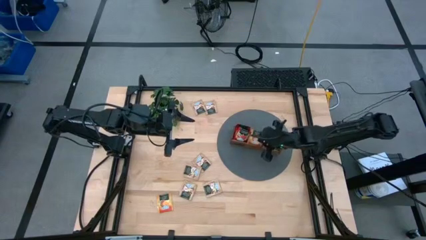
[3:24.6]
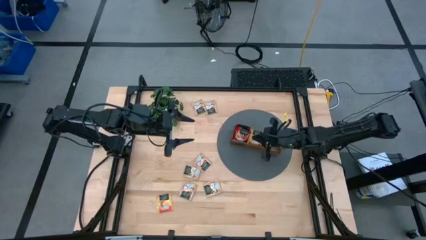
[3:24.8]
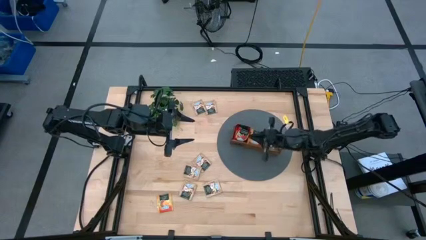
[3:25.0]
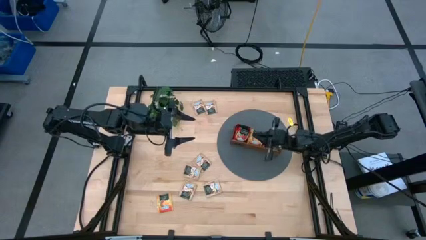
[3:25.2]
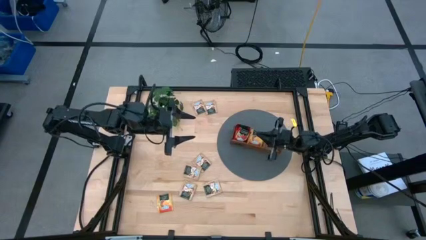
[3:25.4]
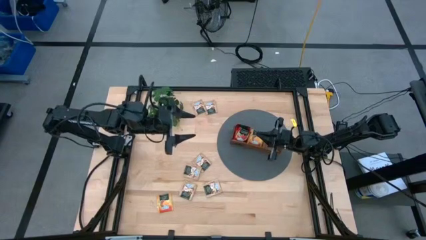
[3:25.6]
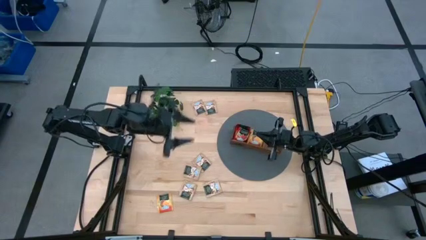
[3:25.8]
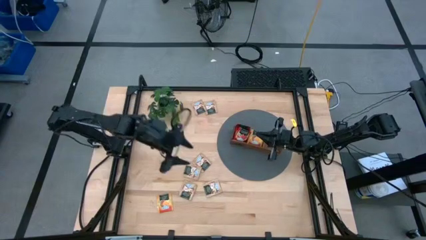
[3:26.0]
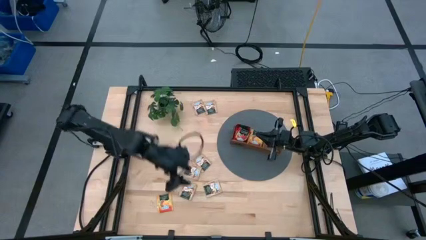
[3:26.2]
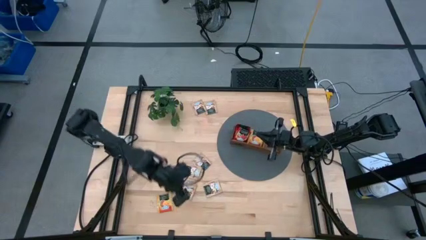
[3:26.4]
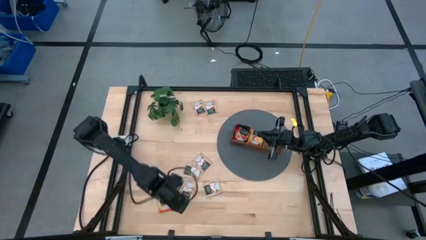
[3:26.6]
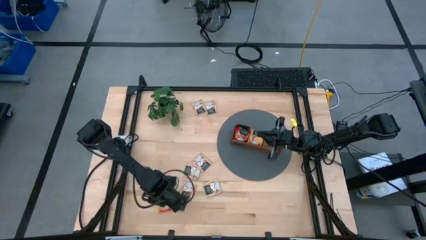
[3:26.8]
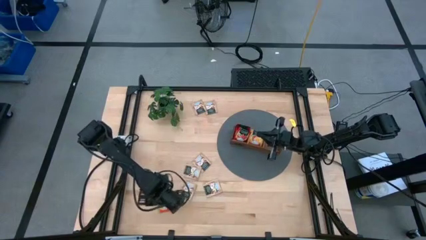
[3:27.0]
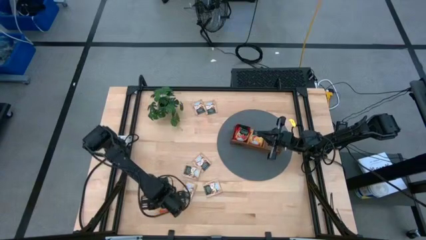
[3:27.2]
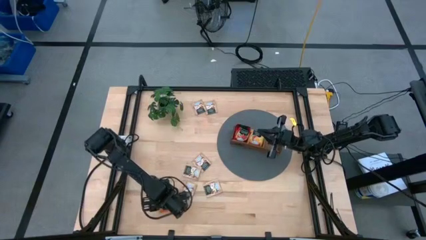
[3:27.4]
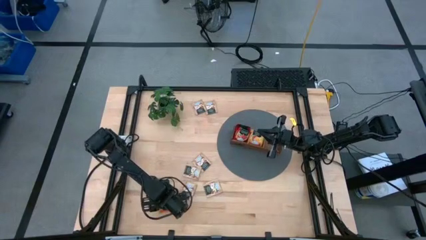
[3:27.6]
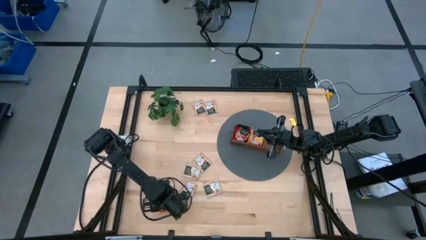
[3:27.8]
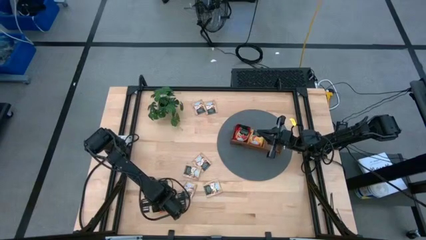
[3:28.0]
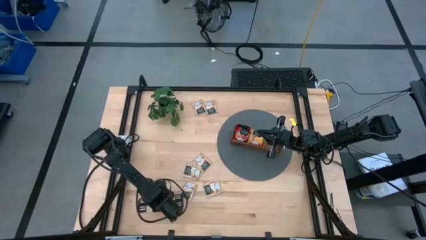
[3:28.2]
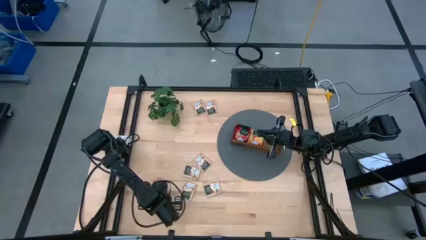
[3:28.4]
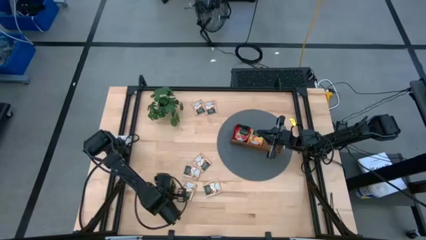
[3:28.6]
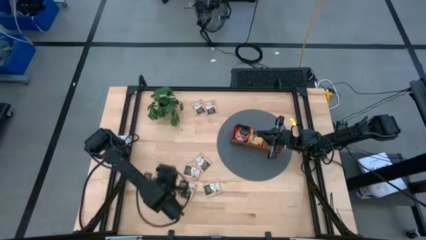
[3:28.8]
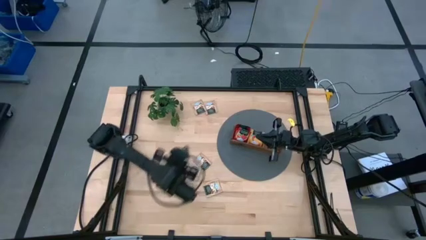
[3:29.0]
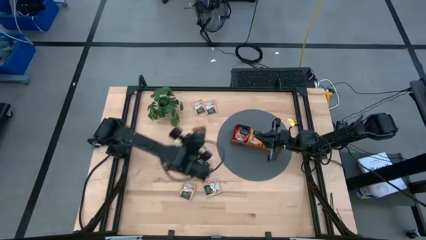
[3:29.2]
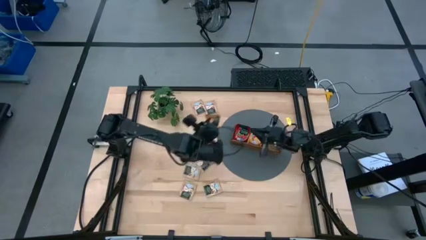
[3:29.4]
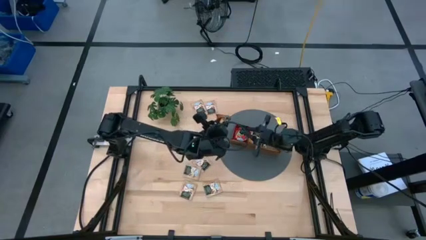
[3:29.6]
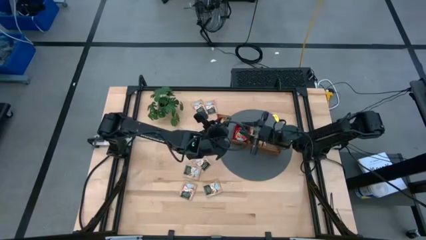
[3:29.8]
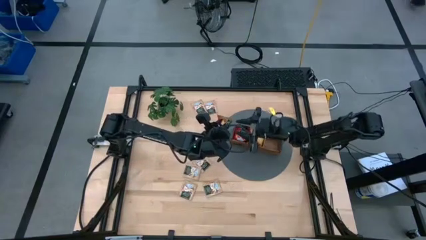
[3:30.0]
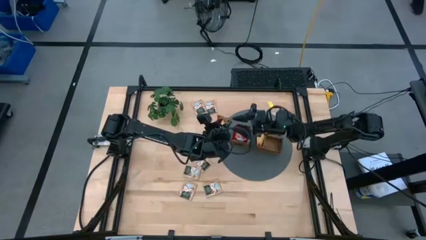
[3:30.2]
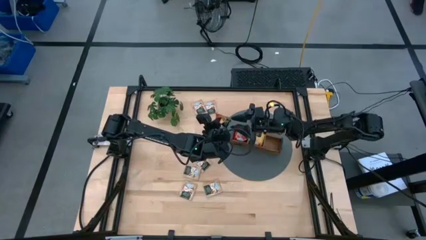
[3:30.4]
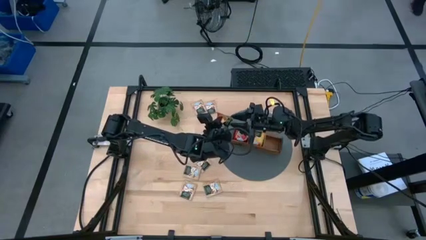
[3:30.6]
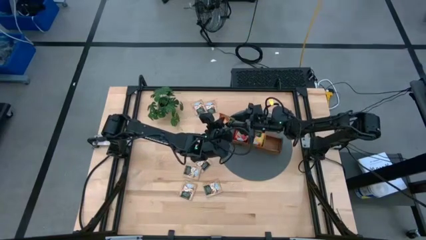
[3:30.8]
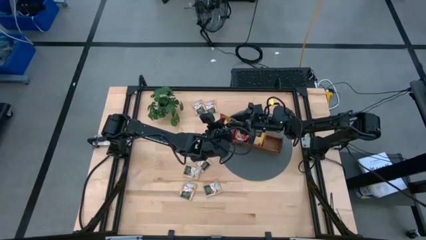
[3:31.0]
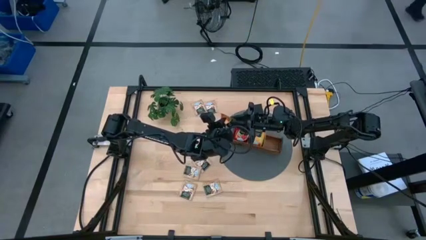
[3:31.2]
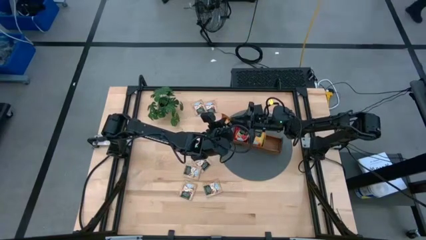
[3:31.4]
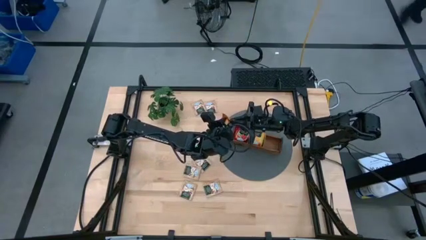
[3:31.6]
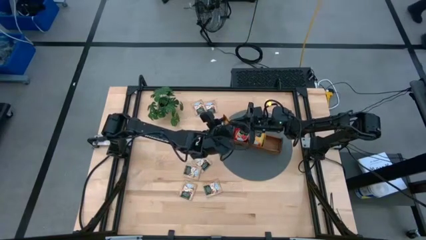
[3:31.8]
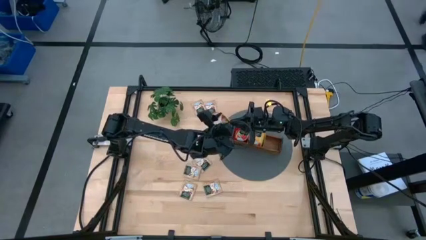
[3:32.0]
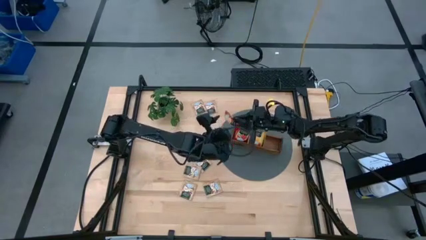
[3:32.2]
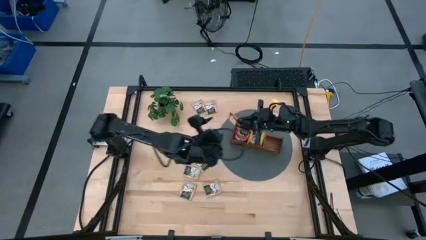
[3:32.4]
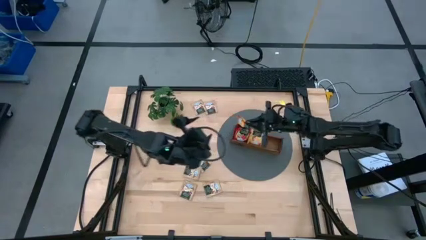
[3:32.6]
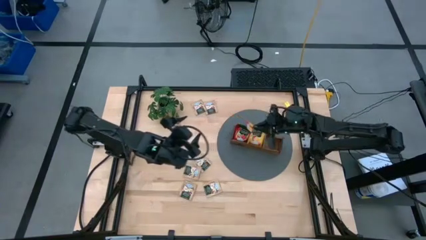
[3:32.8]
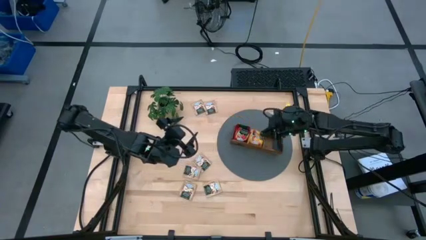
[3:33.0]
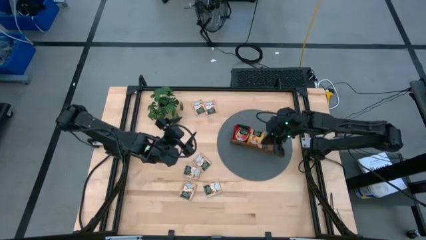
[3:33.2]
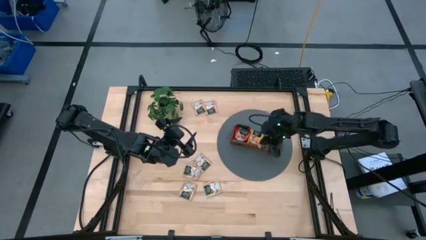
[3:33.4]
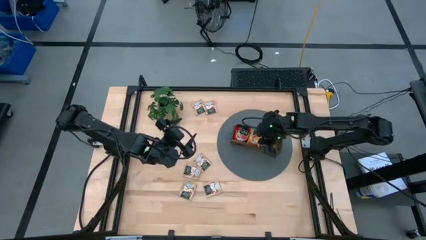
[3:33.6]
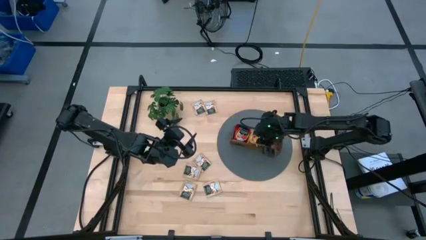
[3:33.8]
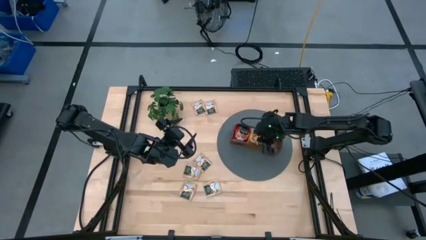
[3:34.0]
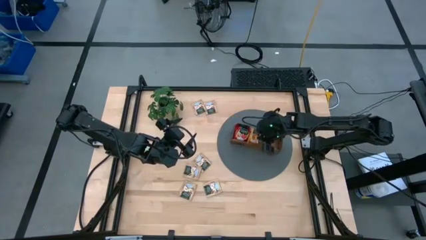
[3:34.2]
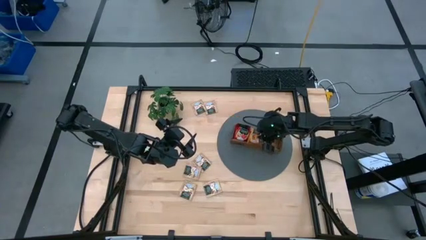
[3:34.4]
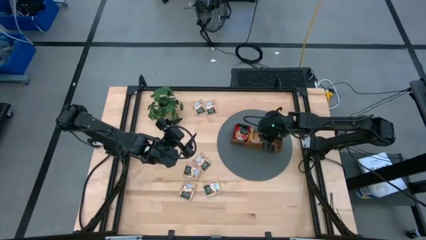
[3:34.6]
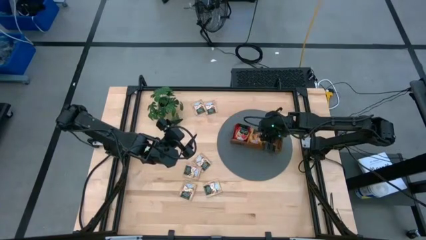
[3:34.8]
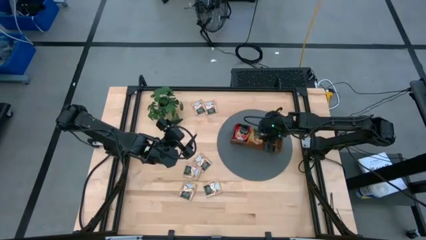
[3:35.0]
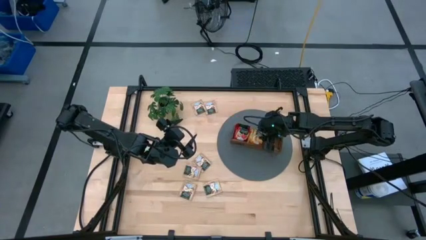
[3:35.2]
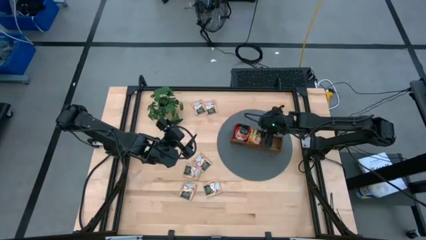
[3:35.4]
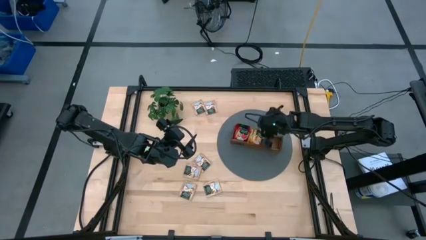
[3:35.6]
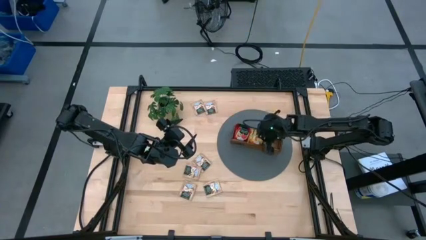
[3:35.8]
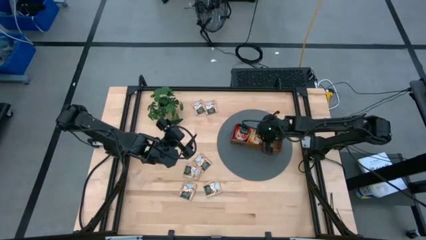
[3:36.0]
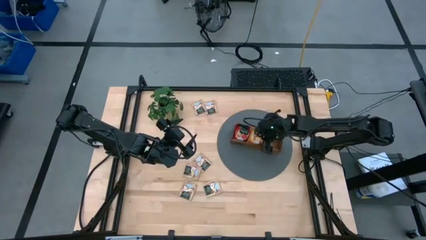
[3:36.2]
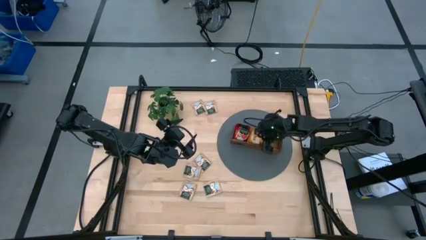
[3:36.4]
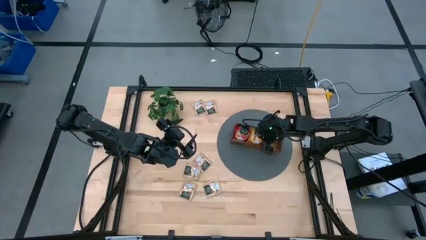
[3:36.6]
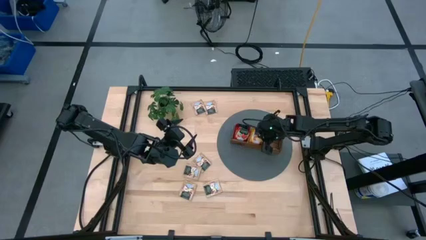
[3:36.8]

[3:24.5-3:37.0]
Task: Pick & Place Tea
Put the yellow tea bag into the middle section of the wooden organizer

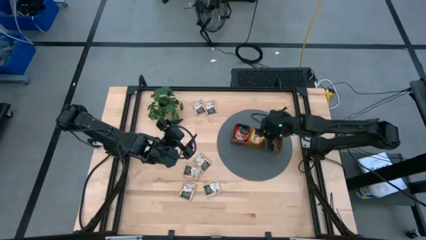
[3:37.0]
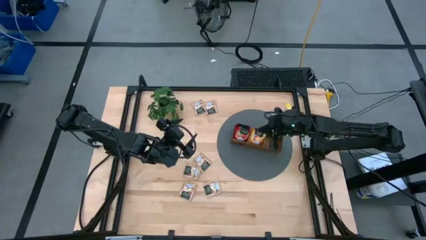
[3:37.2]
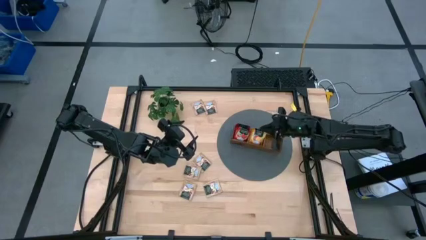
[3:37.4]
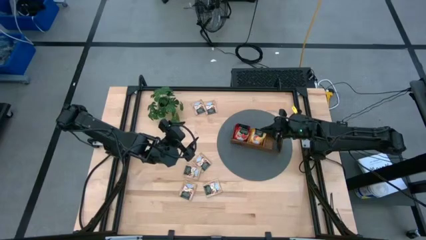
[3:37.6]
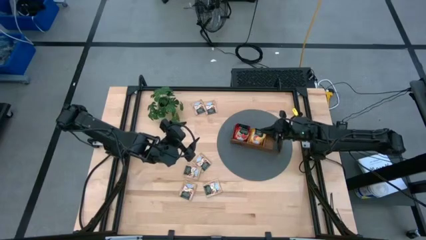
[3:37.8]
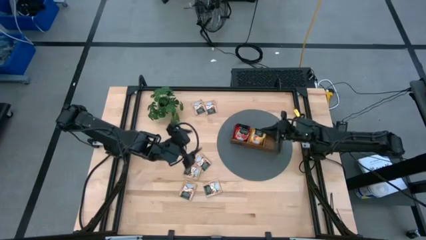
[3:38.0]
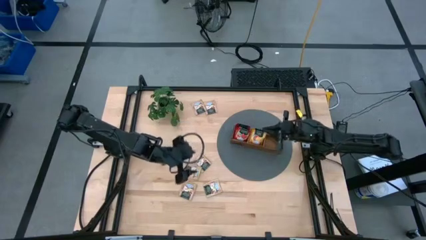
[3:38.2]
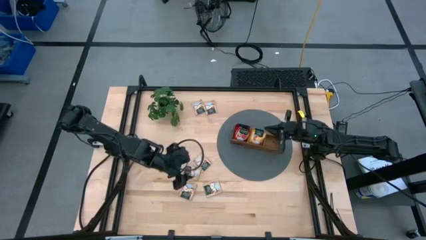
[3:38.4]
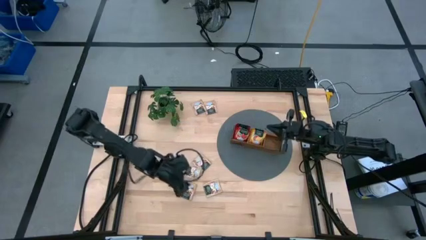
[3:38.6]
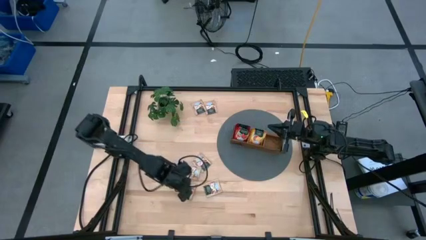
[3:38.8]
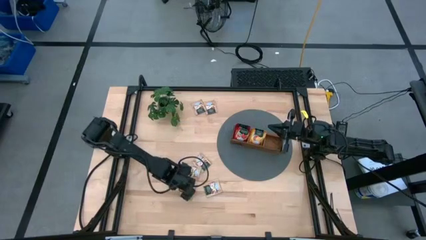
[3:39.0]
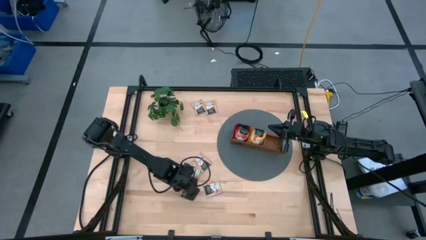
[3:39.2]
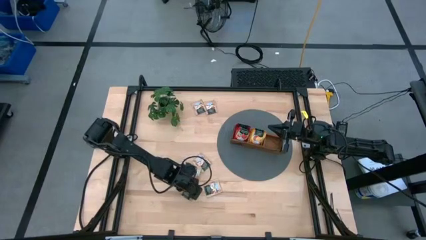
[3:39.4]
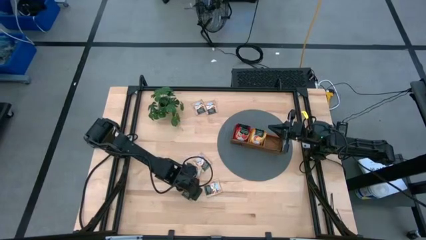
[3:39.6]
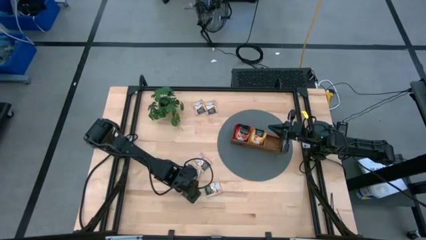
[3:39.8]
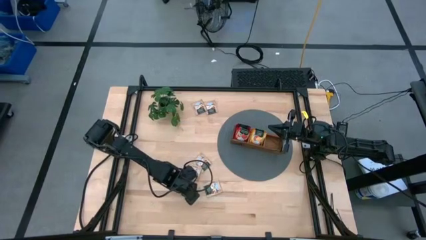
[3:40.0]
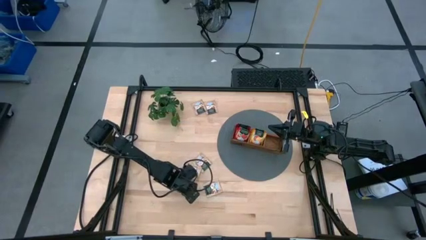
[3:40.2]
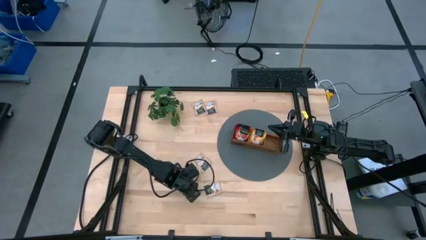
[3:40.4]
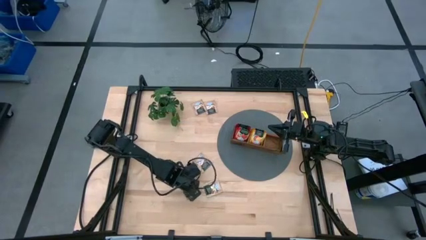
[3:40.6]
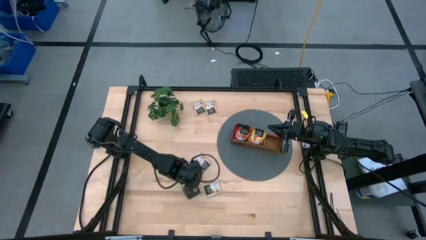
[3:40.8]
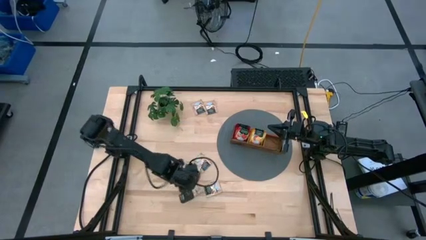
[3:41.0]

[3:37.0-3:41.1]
Put the brown tea bag into the right section of the wooden organizer
